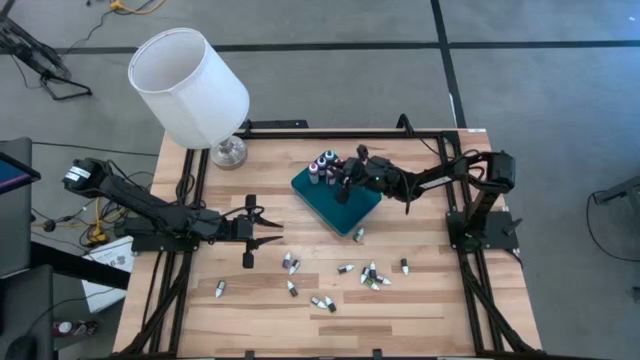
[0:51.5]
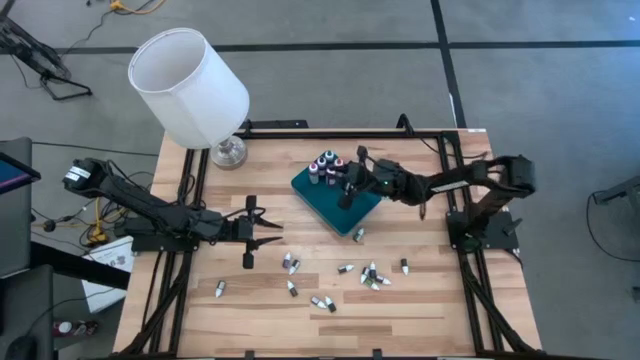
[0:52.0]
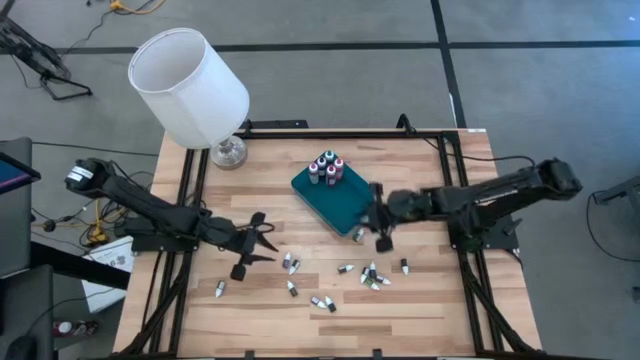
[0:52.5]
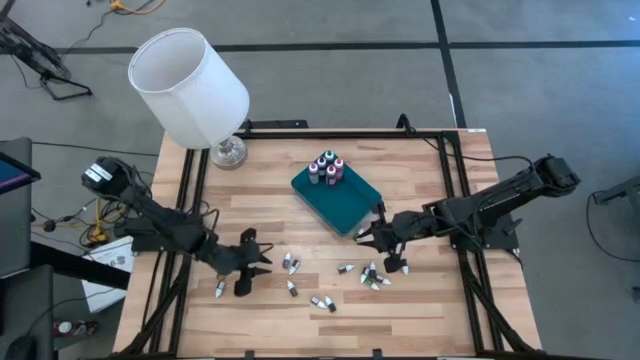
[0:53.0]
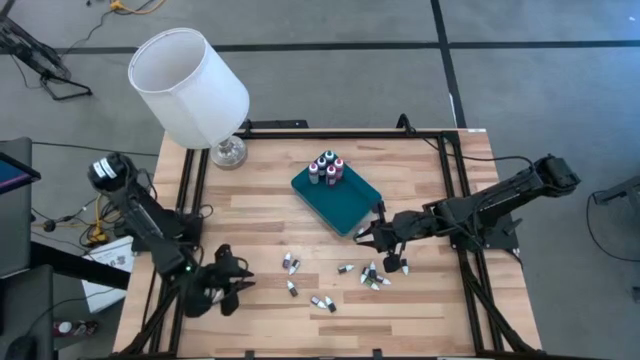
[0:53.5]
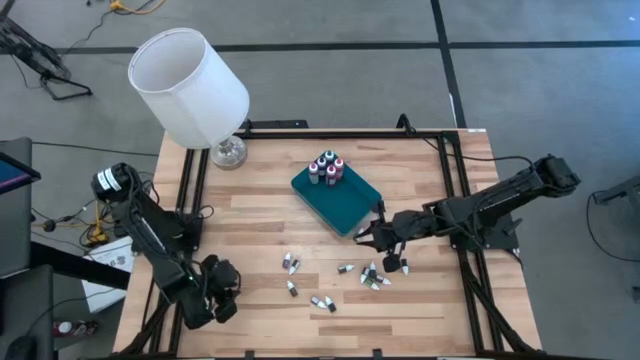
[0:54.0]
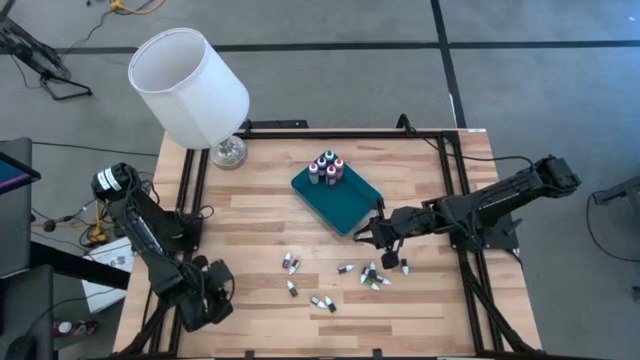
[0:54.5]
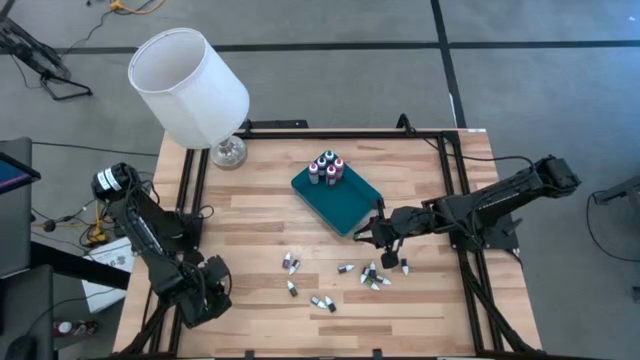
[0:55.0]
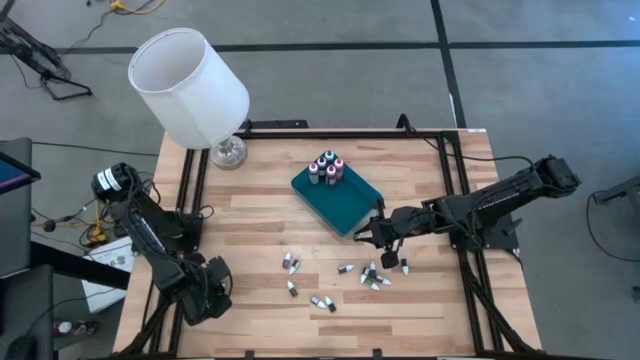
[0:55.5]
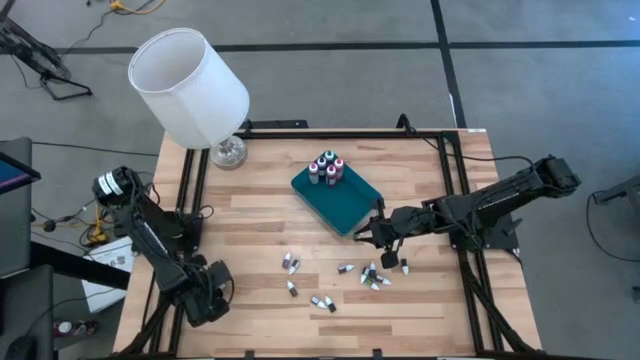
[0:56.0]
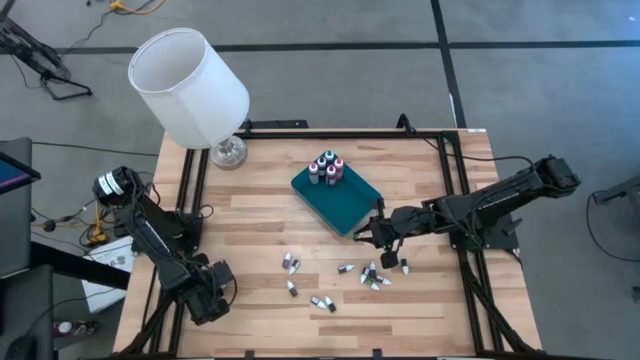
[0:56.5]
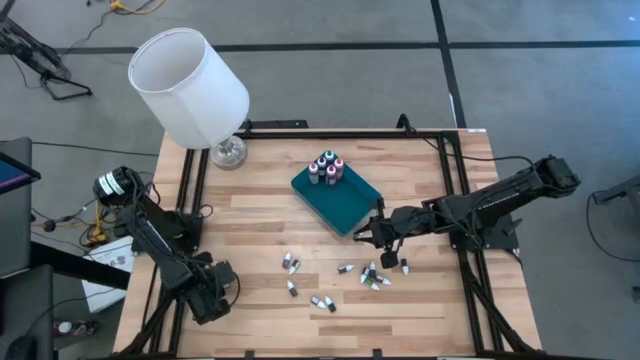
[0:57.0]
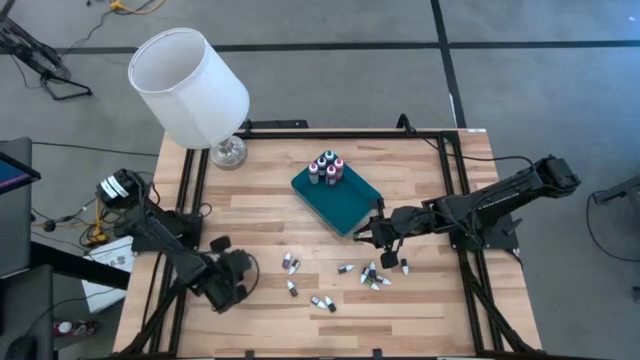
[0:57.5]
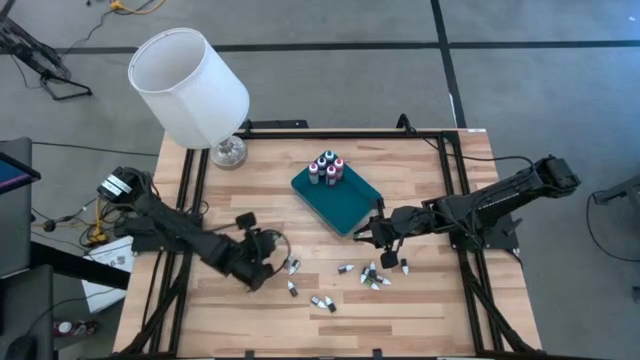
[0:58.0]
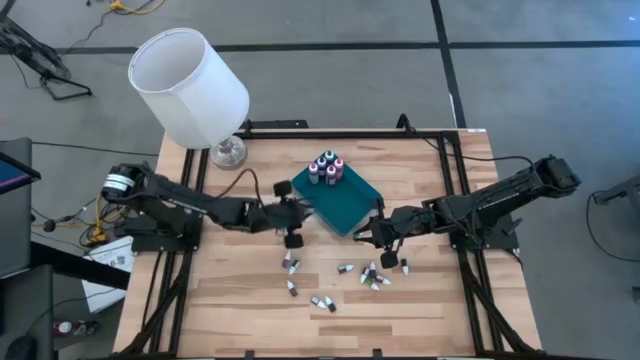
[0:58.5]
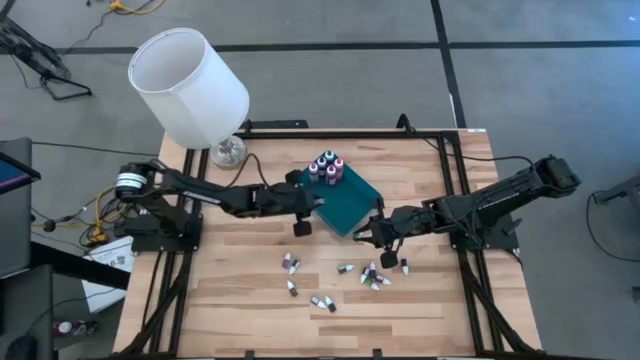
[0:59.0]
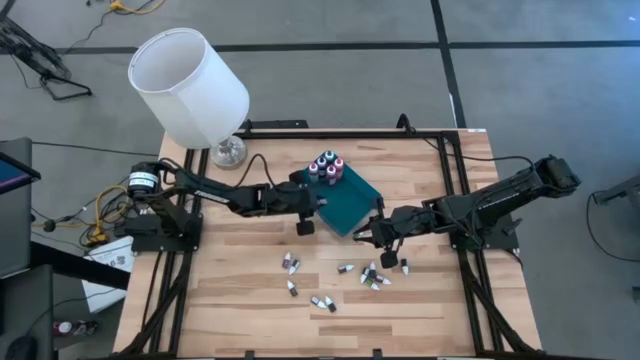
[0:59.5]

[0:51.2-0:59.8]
Task: Pick & Place food coloring
Put the small green food coloring bottle into the blue bin

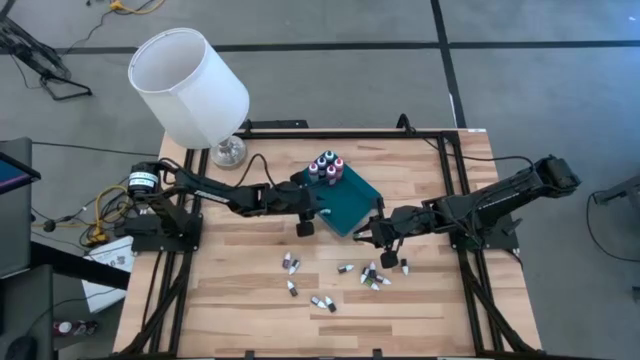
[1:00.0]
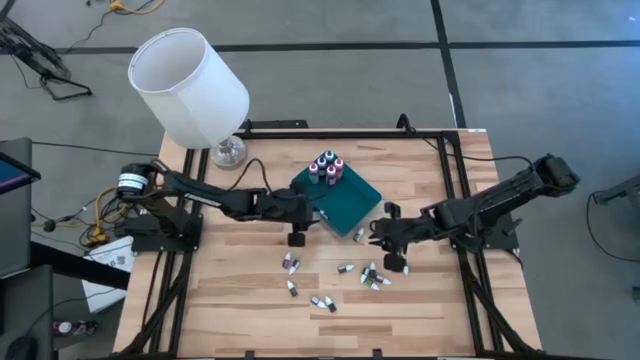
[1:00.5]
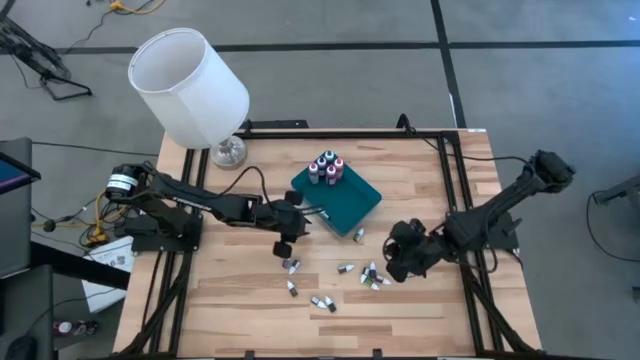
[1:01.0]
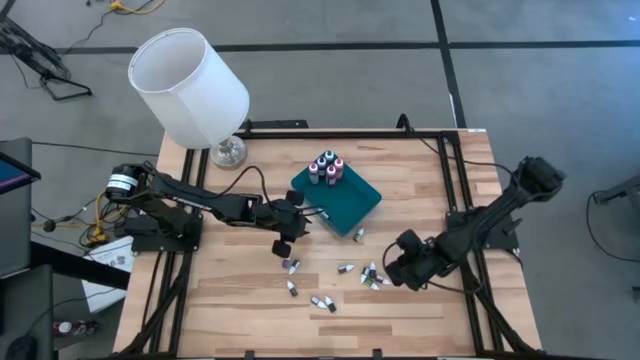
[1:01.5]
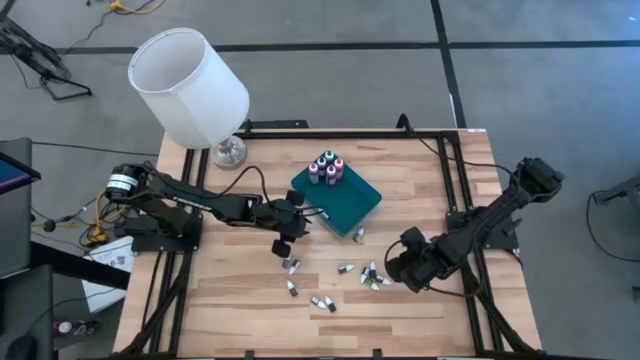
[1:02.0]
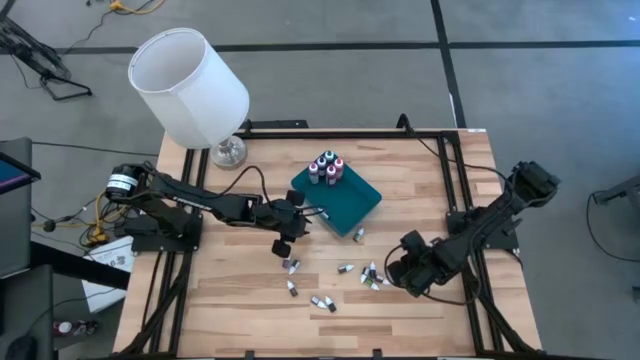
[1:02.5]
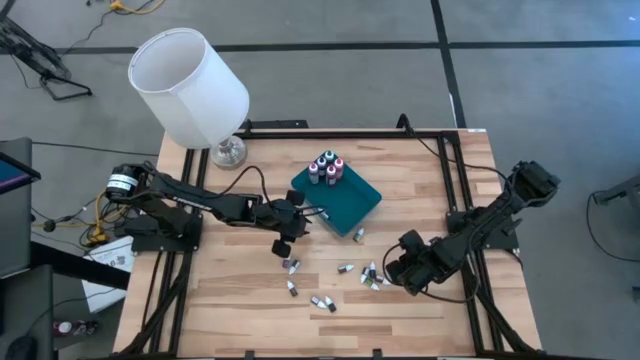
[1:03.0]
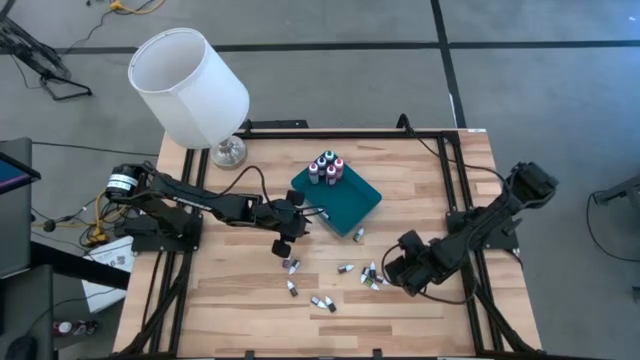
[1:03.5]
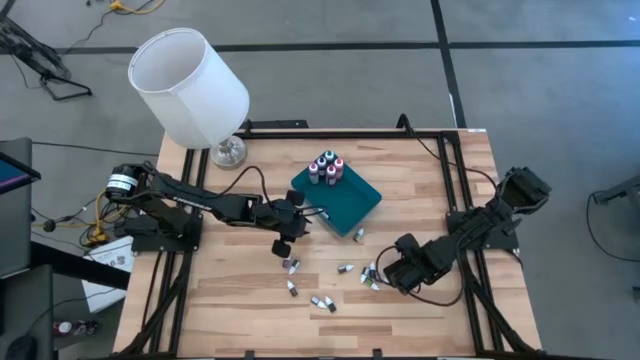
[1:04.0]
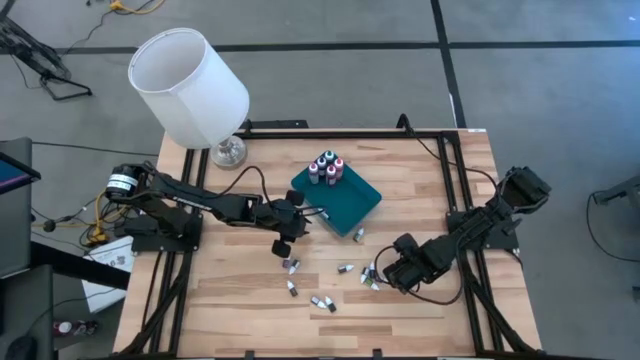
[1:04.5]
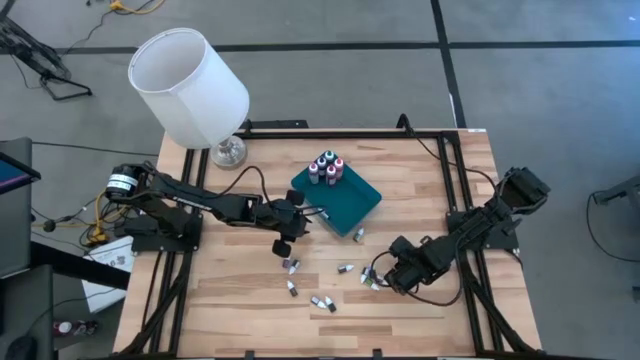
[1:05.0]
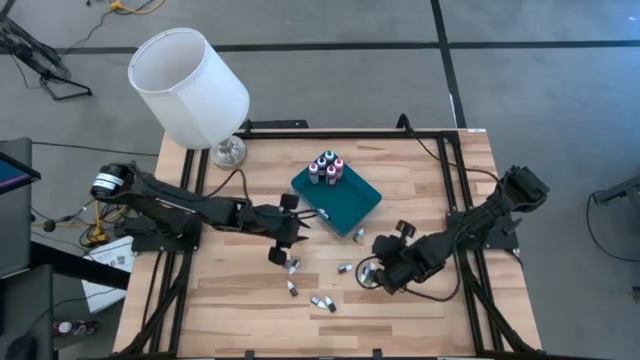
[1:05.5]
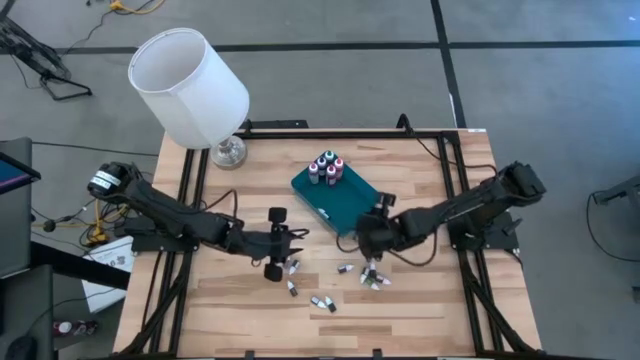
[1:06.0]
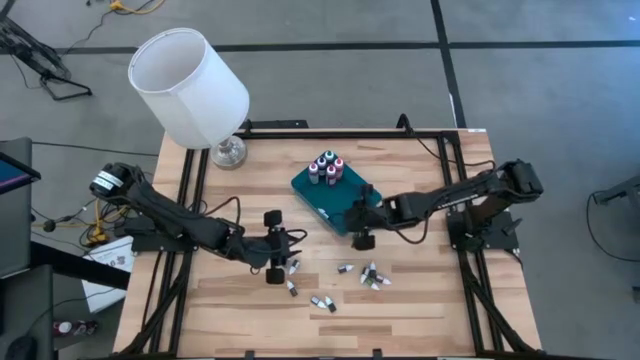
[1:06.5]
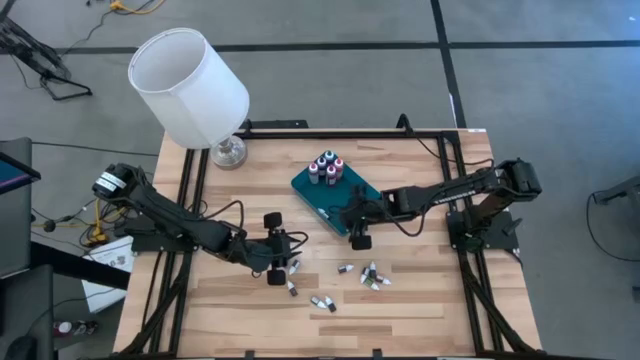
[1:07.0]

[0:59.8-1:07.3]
Put the small green food coloring bottle into the blue bin

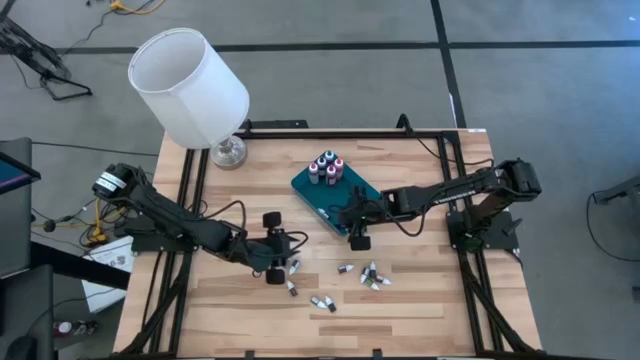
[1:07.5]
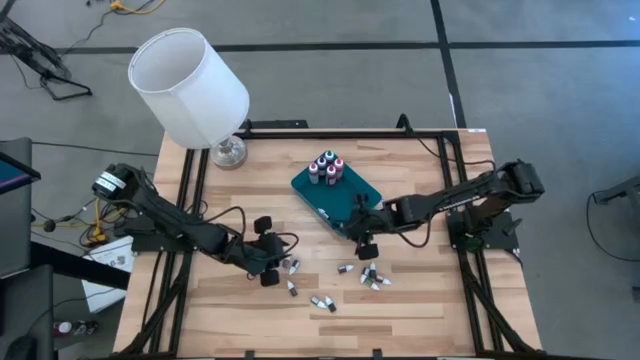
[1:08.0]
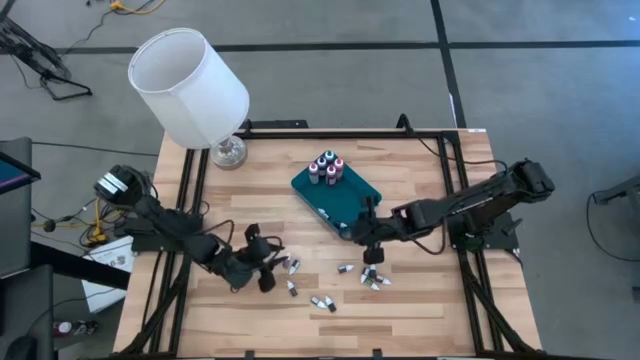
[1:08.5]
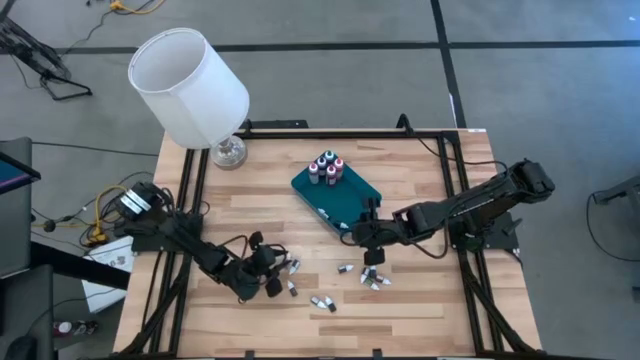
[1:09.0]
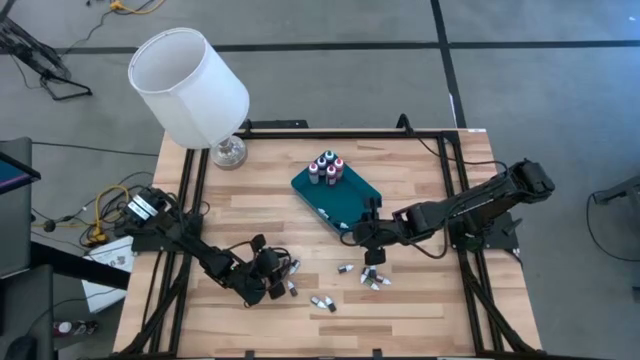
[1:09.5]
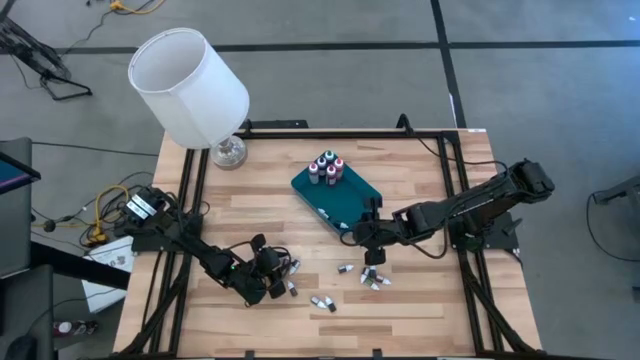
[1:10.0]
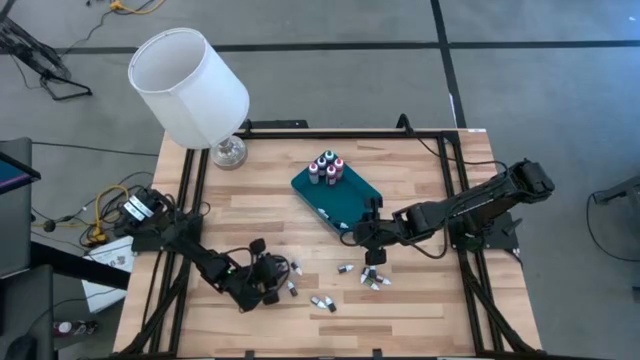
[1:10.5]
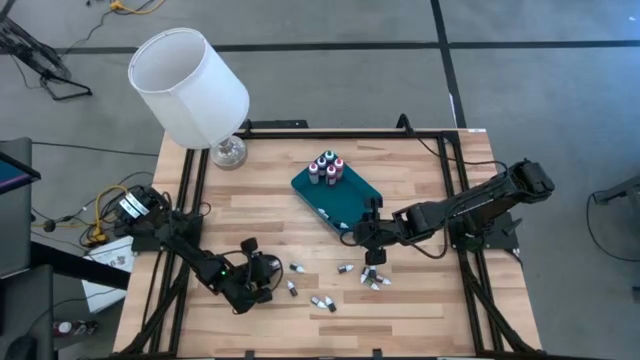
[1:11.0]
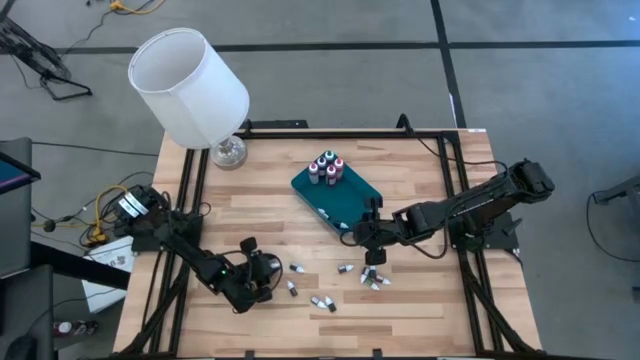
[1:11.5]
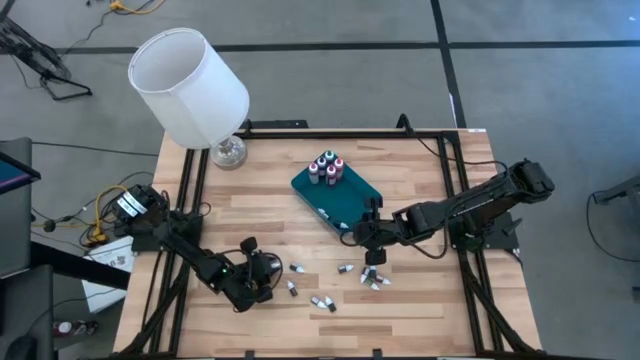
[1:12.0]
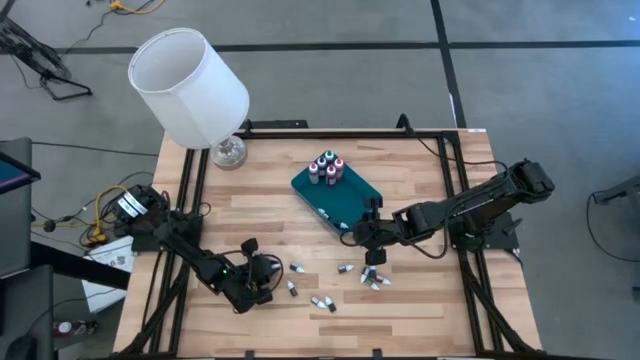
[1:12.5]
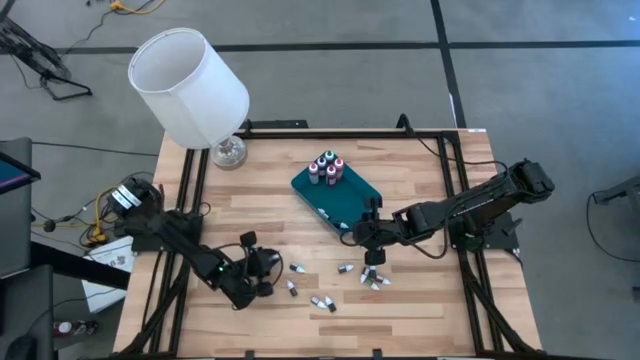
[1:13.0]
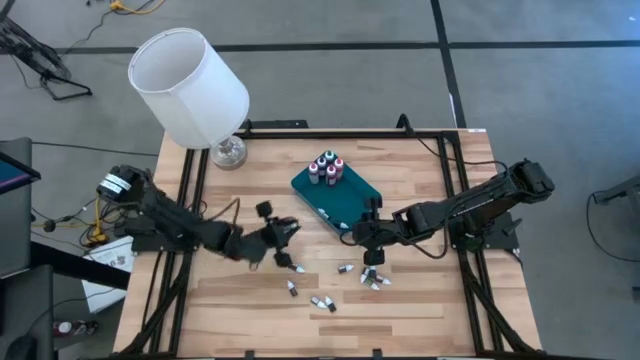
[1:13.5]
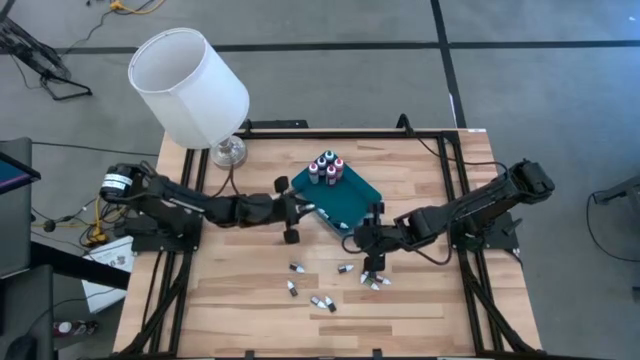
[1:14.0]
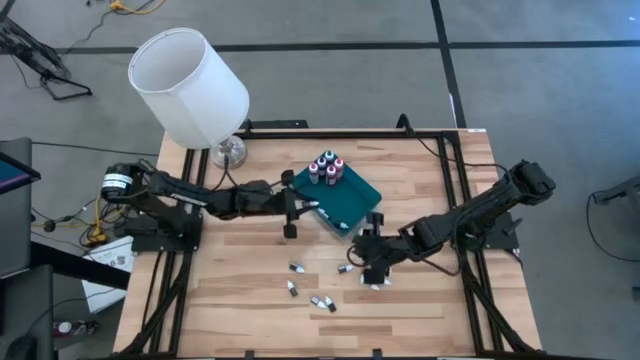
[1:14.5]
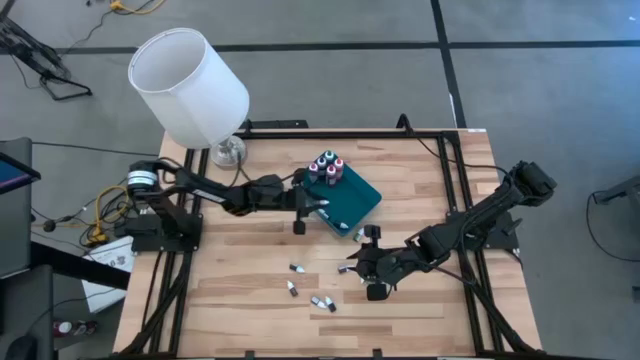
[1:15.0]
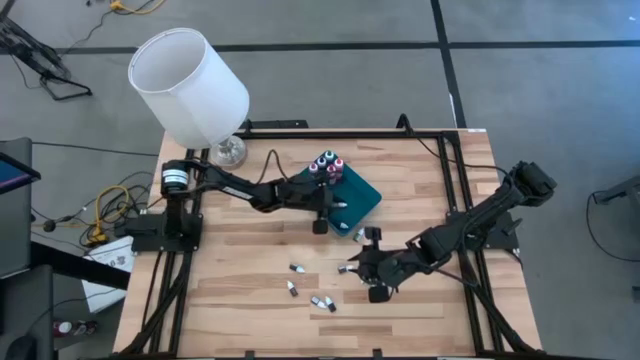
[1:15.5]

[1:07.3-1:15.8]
Put the small violet food coloring bottle into the blue bin
